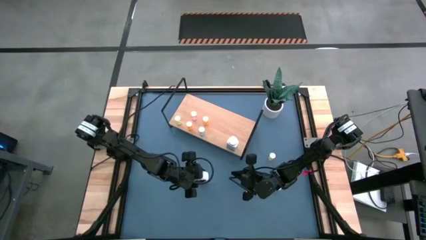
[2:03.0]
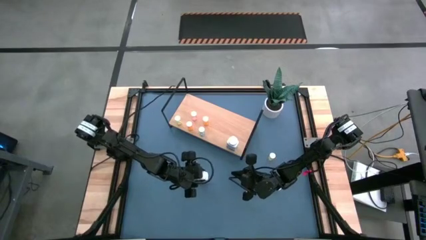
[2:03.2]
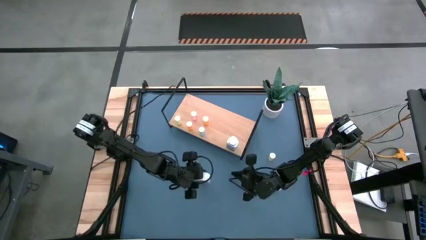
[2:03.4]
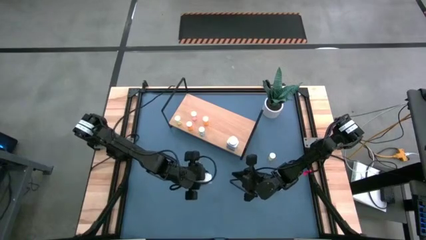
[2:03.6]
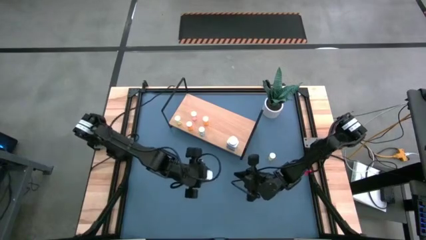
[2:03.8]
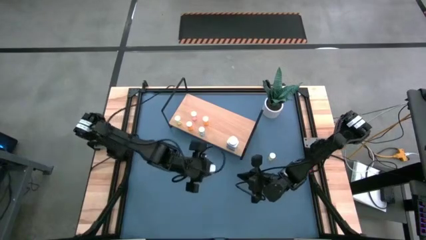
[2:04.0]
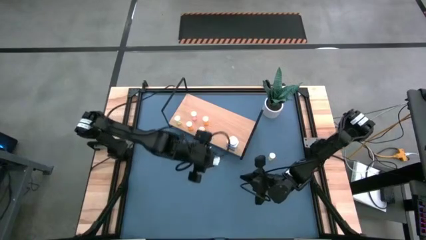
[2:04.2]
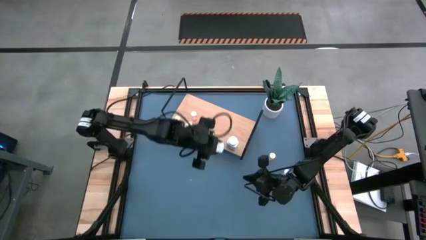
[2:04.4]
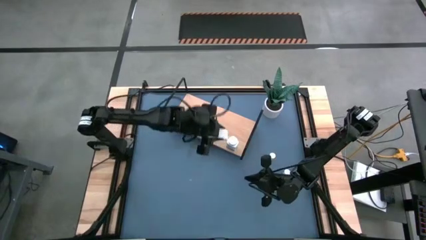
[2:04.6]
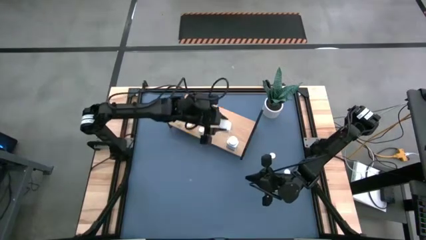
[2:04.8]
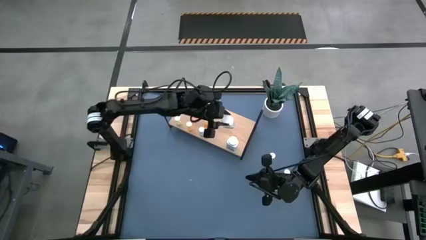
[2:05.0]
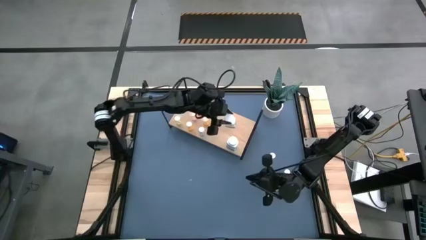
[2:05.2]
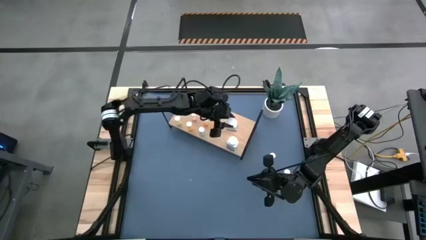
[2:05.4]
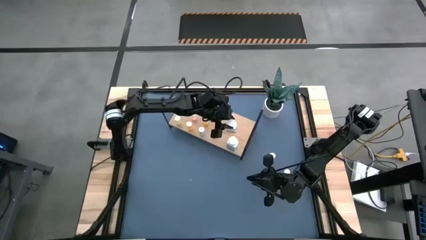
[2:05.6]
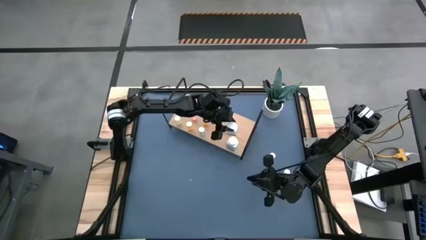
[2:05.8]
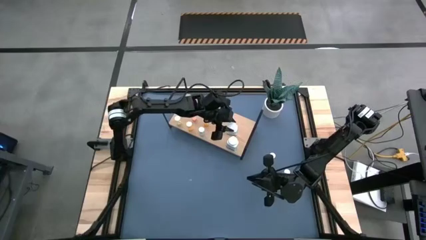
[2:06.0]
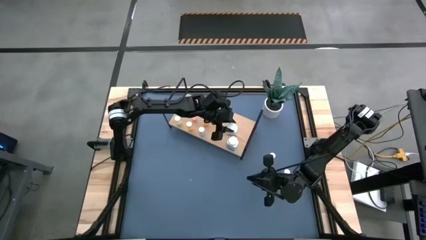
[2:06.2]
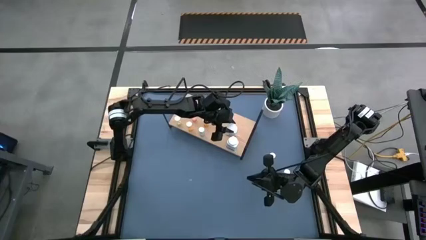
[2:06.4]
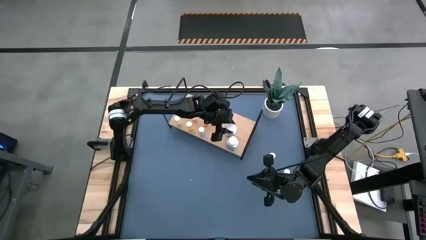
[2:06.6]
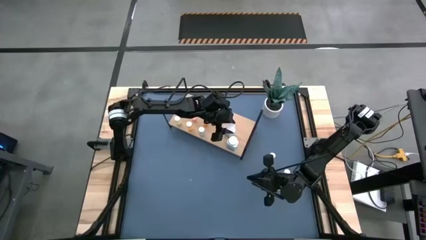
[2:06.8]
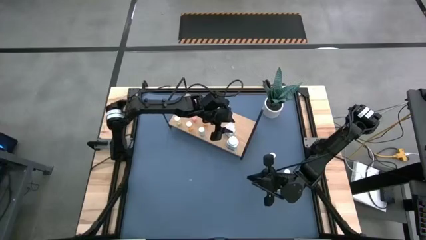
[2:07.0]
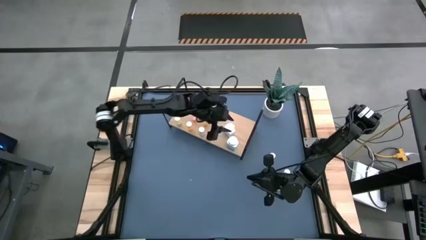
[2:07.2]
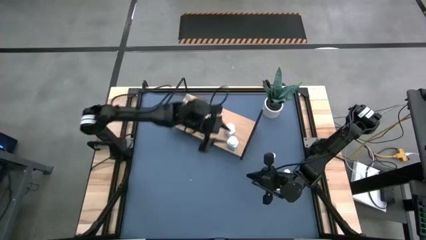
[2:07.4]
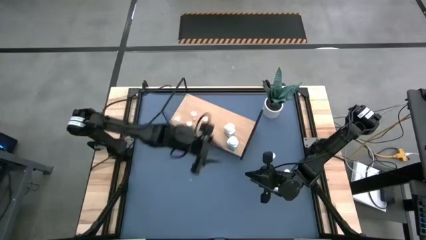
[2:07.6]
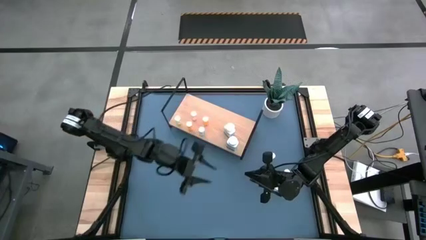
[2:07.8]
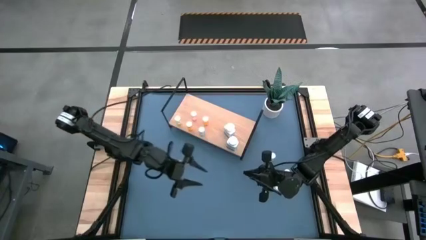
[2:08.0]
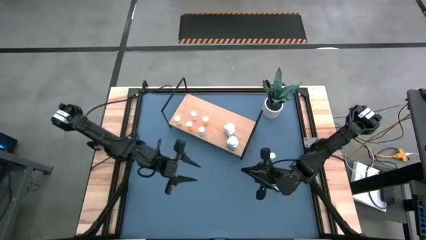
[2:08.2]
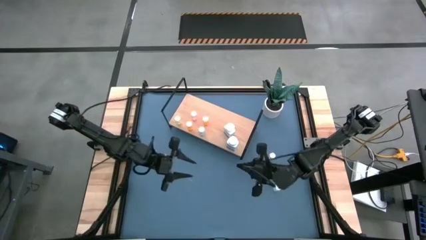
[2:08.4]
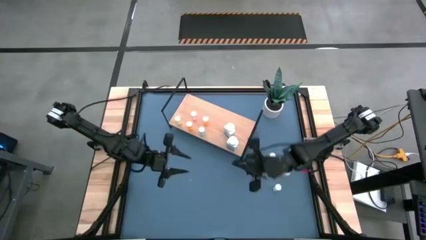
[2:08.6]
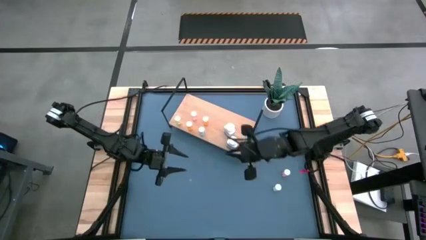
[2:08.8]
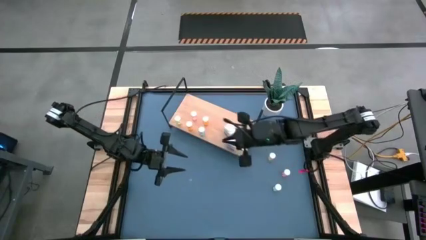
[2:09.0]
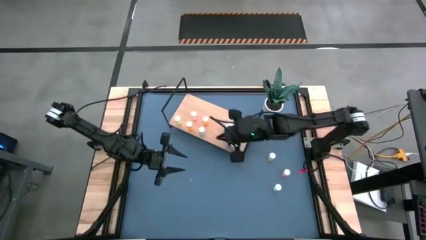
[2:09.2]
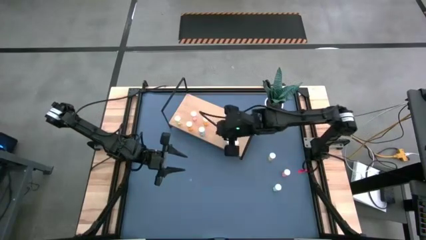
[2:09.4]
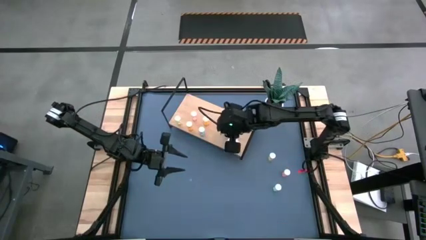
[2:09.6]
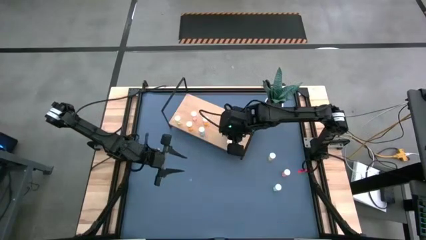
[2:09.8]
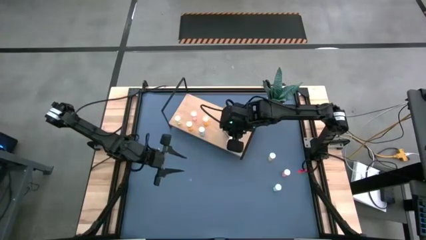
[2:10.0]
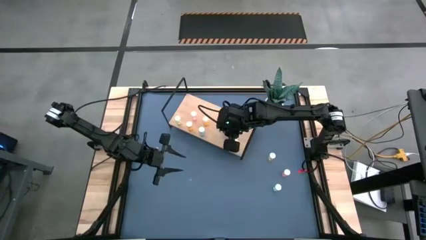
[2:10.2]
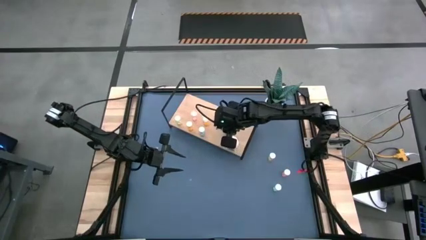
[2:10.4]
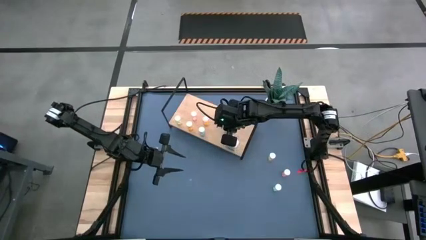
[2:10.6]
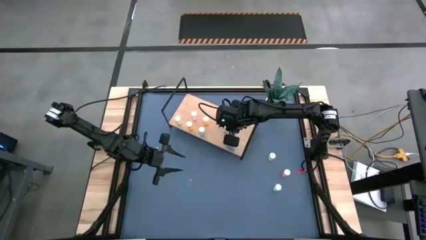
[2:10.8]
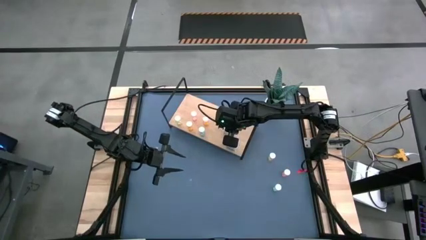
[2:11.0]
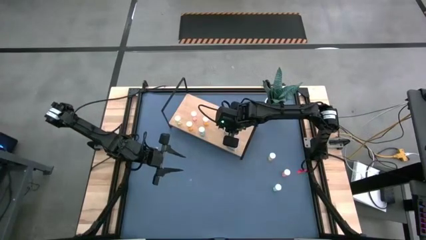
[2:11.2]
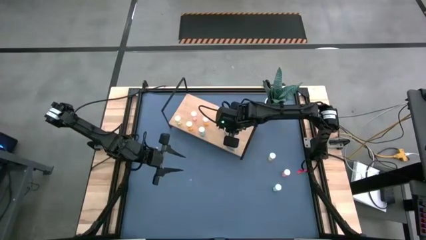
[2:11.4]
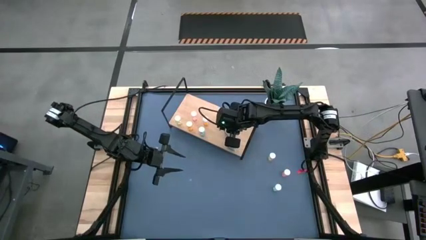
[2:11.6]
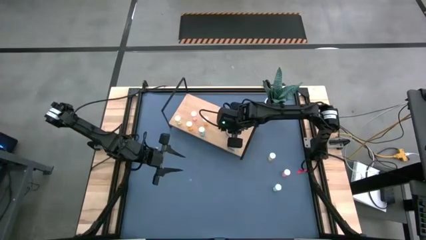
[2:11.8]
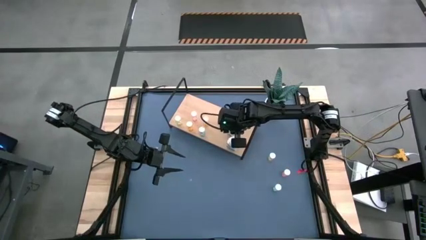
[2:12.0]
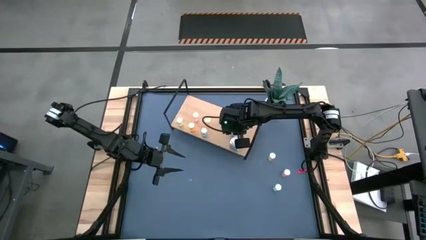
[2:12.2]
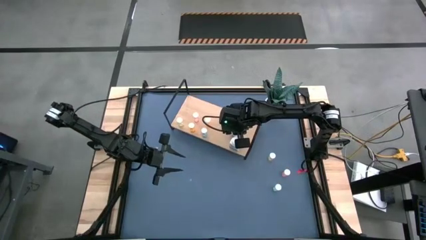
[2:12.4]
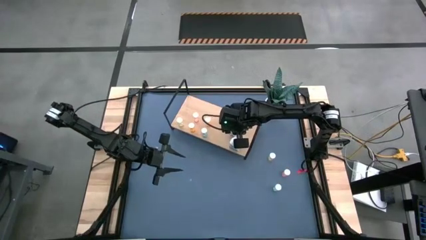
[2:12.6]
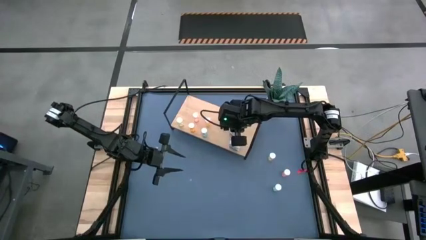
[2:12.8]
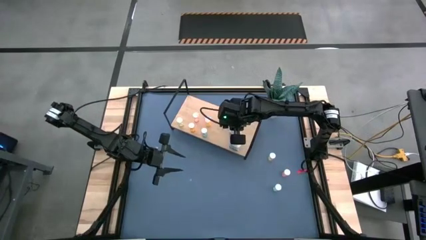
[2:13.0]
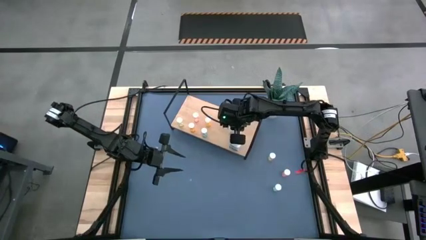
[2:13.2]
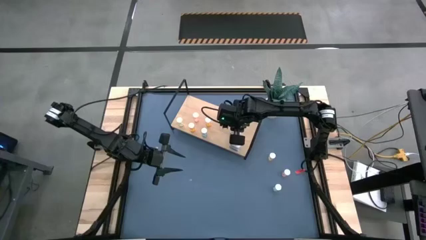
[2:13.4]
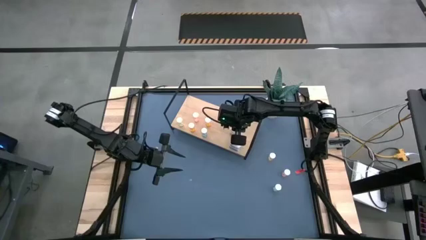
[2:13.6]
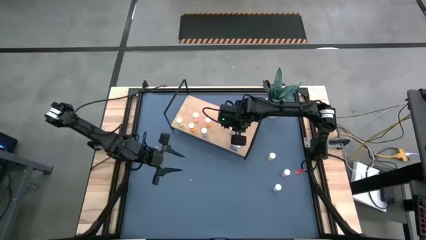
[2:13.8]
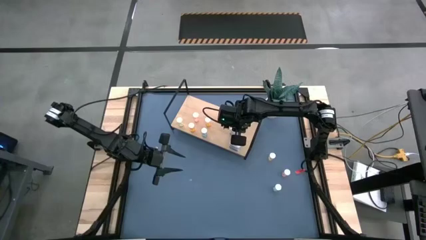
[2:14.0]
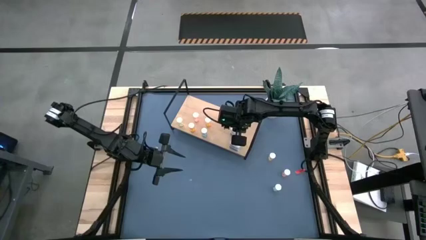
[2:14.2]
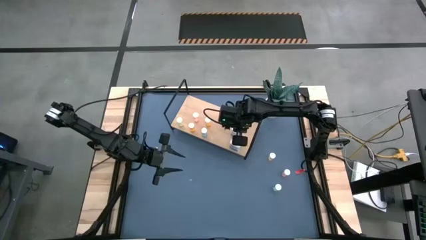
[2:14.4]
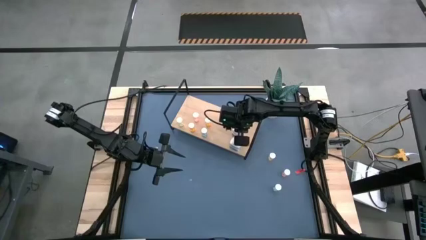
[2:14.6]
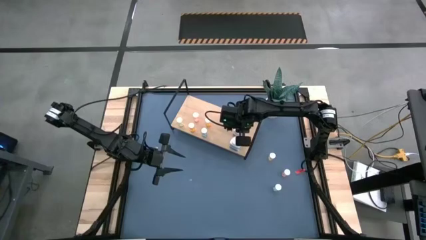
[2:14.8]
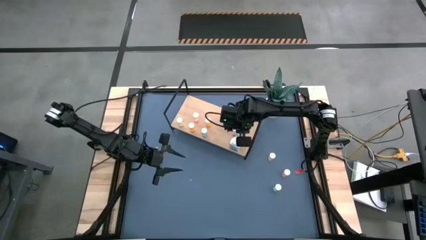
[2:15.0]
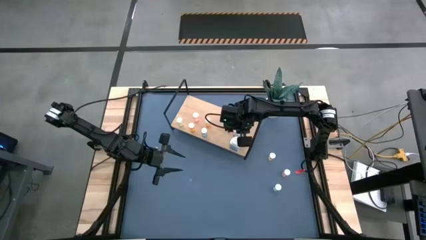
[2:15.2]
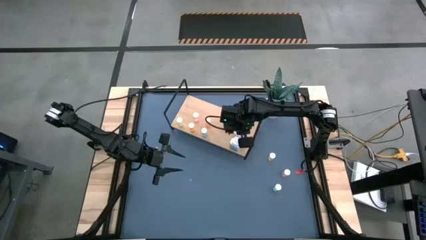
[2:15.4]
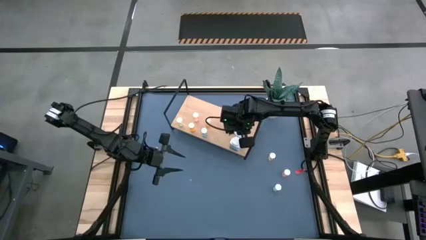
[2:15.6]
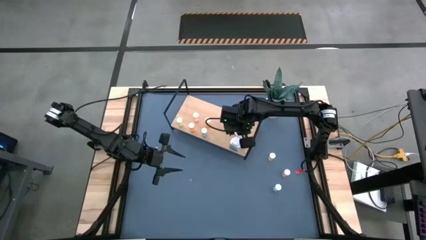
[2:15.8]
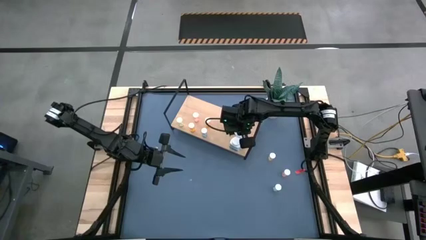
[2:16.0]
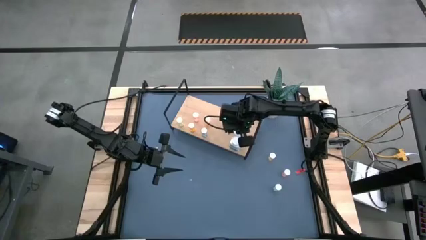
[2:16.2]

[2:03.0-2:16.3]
Task: Pick and place medicine bottles onto shelf by color
Put the white pill bottle on the shelf

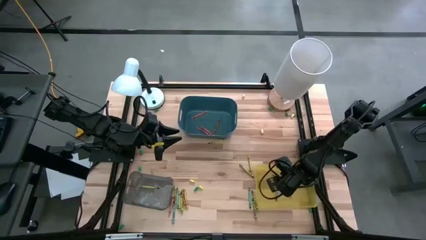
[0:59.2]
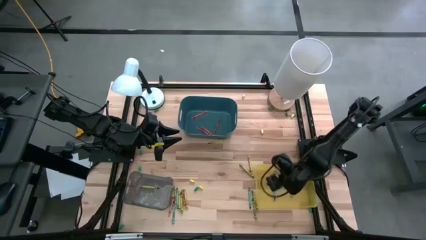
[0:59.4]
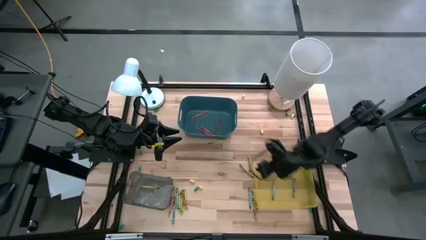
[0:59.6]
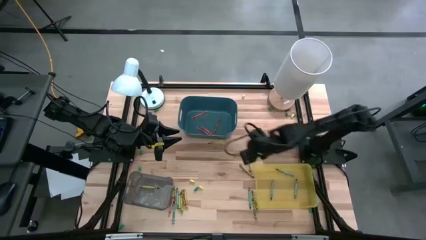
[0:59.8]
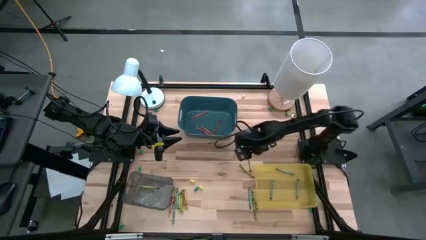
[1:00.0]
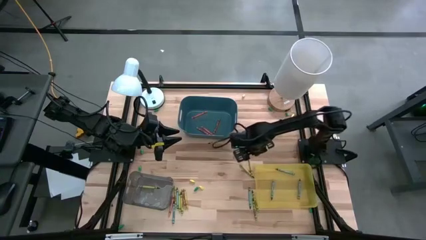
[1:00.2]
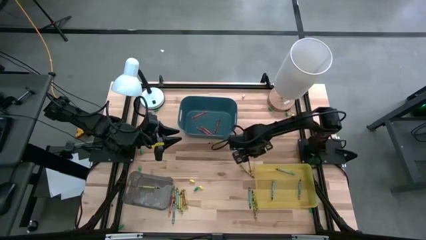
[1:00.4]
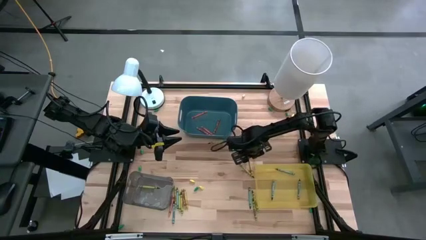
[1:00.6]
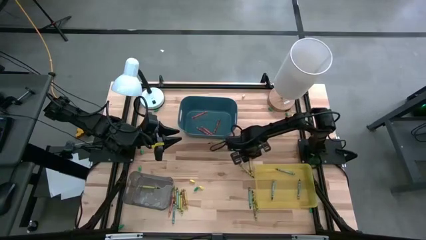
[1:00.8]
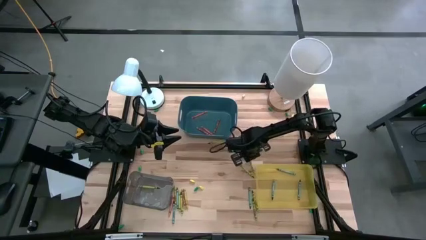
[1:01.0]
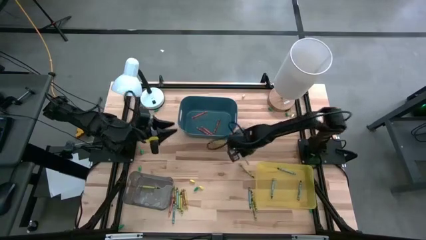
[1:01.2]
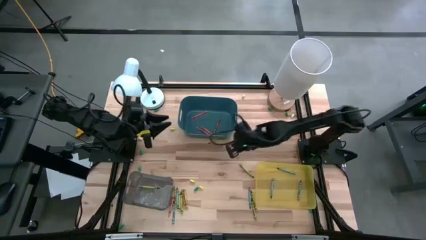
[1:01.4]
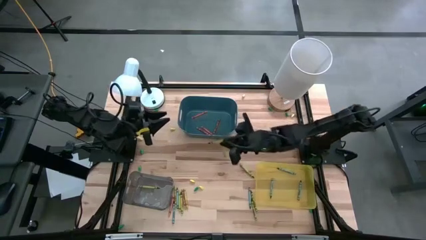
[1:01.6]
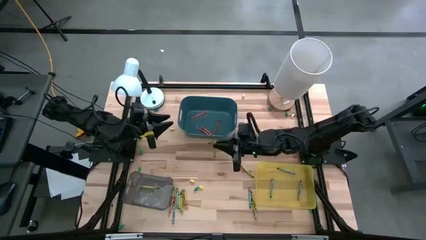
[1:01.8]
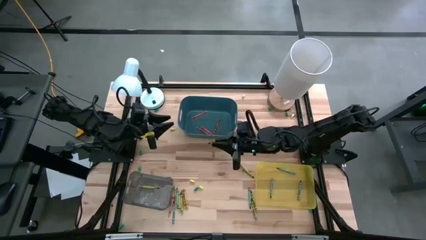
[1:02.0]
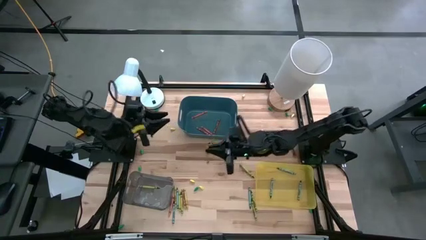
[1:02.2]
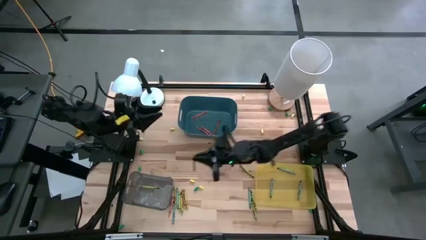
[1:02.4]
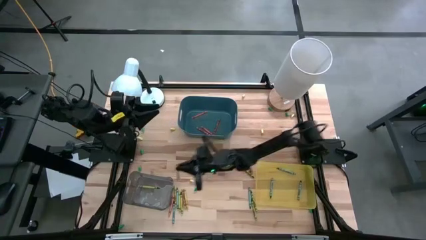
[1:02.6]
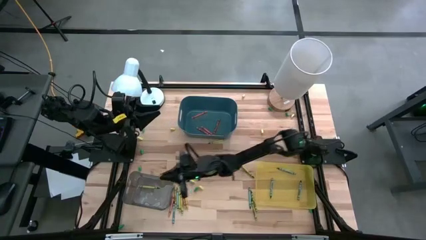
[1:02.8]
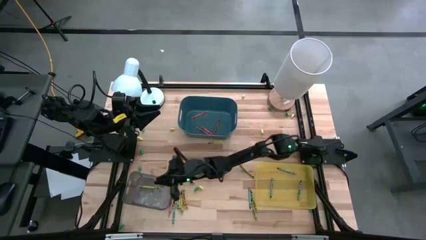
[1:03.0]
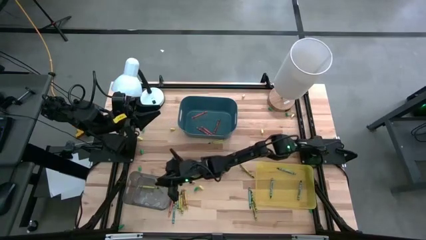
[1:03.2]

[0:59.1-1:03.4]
Task: Sort crayons
Put the yellow crayon into the gray bin
